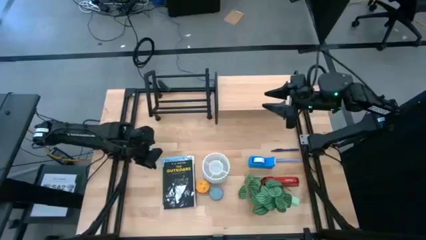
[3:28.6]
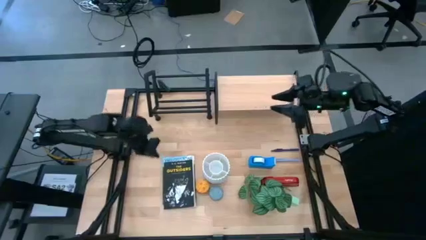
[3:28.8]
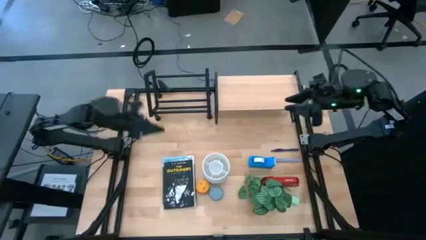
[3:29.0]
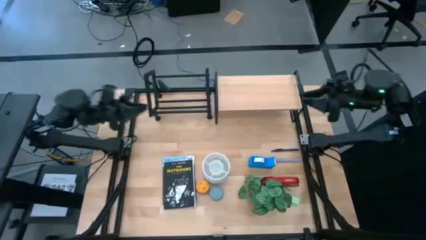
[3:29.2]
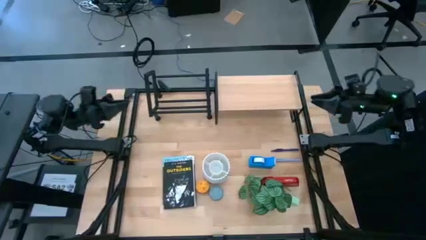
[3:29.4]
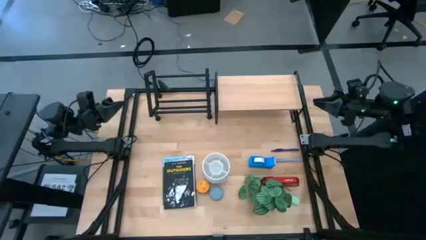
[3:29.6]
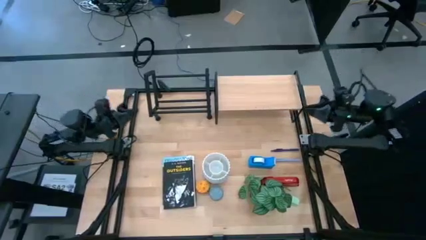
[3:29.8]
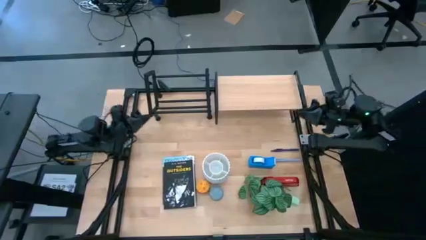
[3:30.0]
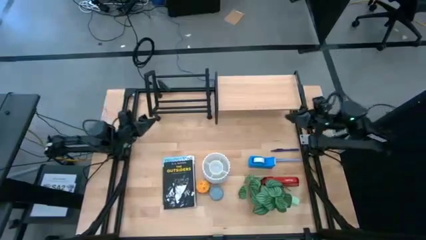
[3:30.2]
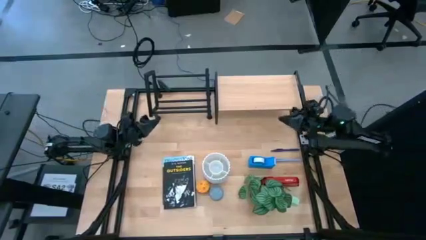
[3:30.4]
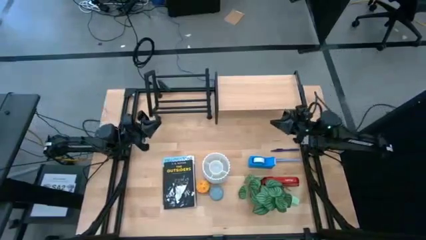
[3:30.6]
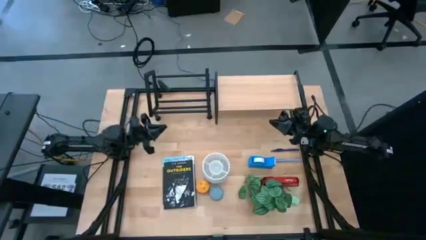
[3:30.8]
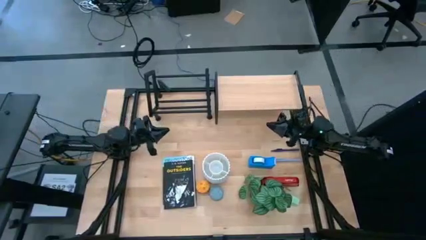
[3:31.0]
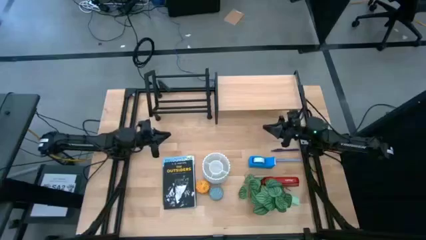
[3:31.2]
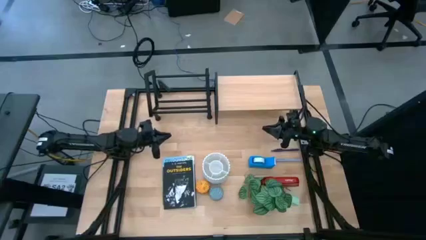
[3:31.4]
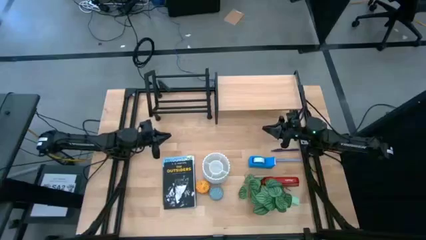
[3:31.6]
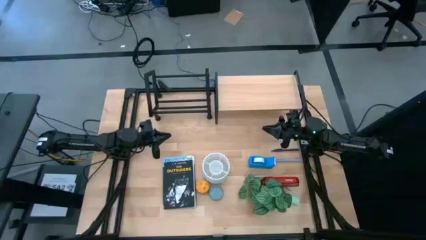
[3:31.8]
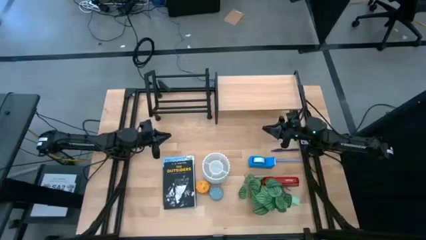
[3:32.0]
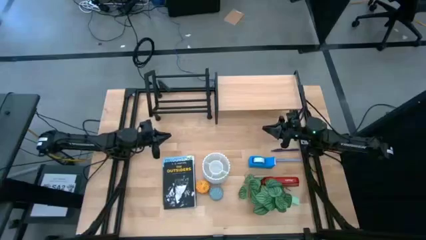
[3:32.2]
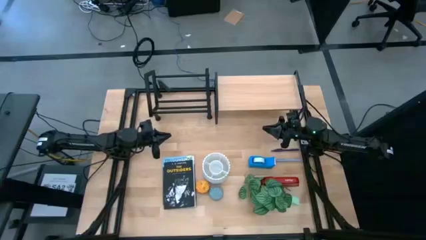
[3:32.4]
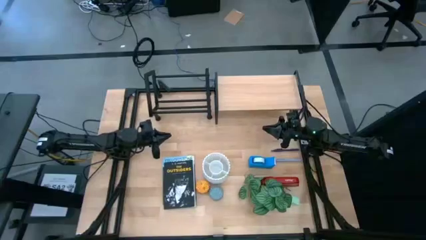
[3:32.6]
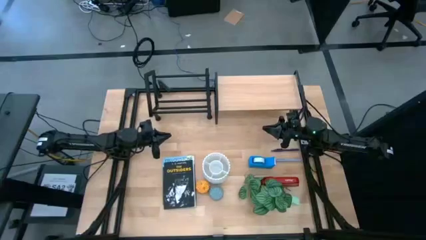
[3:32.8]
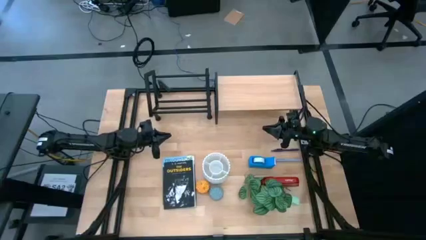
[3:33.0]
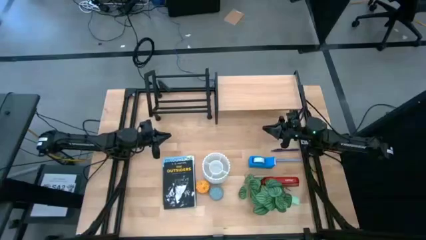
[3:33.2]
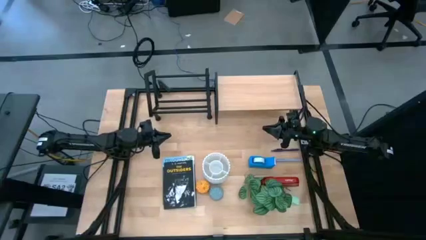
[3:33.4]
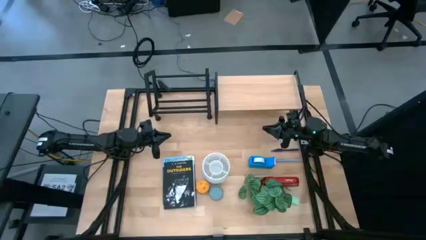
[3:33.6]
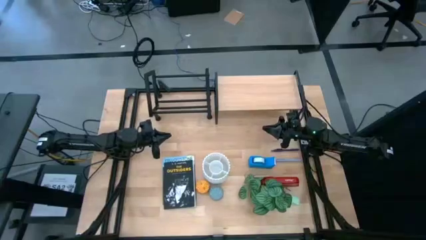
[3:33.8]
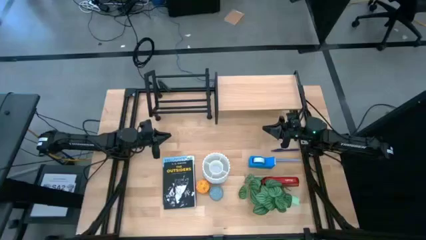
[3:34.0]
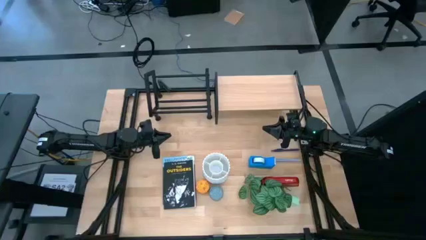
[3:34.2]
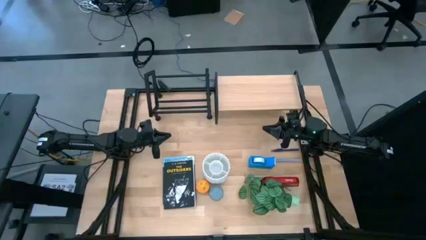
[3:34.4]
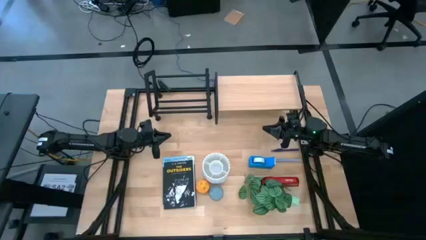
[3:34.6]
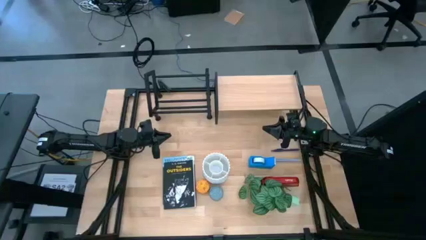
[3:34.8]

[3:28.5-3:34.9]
Task: Stock shelves
Return to Home Position

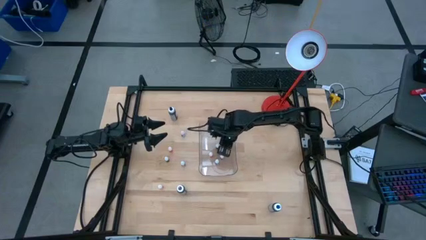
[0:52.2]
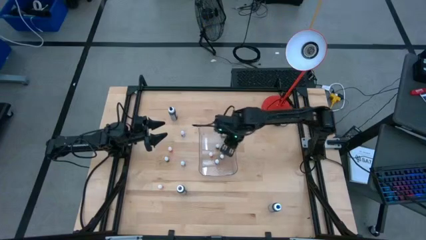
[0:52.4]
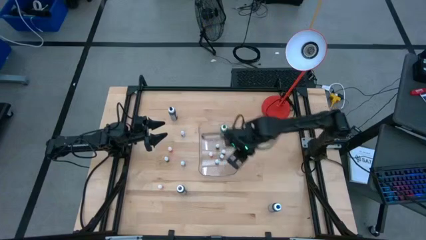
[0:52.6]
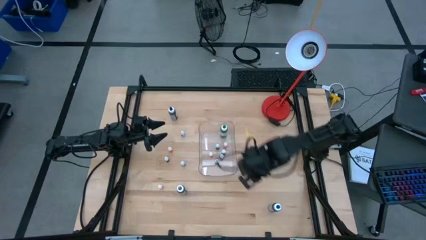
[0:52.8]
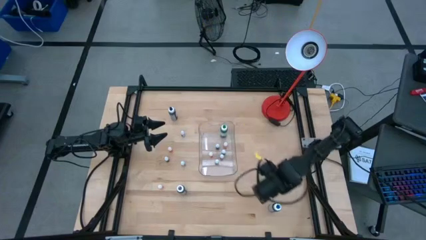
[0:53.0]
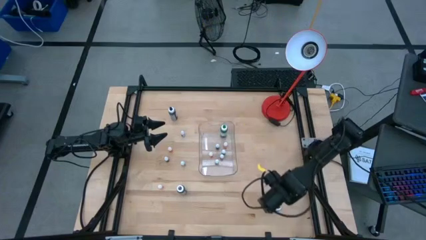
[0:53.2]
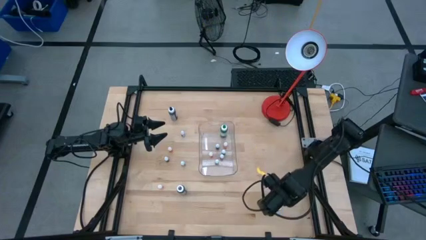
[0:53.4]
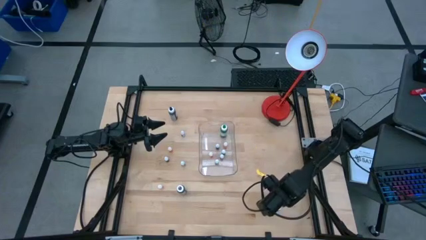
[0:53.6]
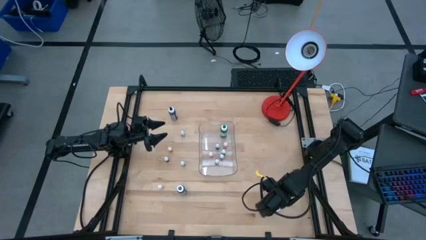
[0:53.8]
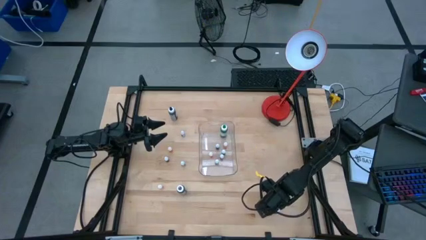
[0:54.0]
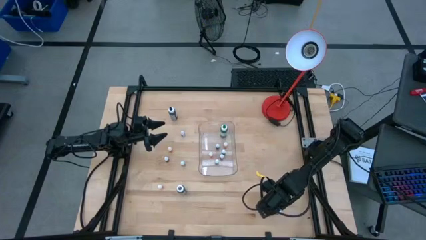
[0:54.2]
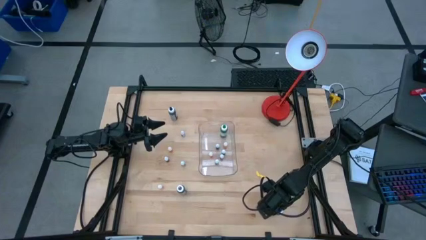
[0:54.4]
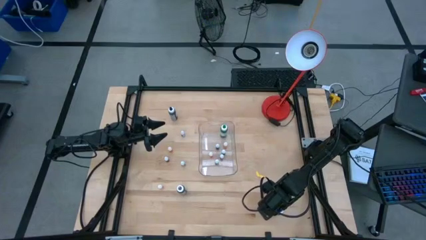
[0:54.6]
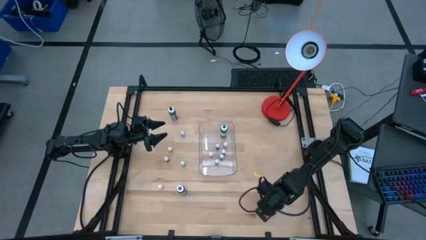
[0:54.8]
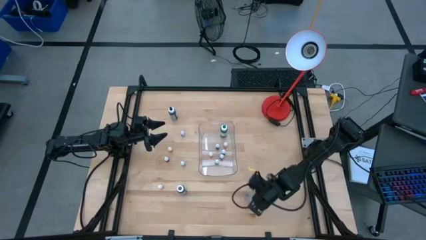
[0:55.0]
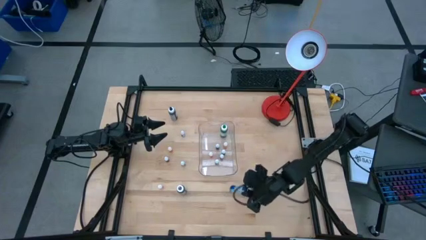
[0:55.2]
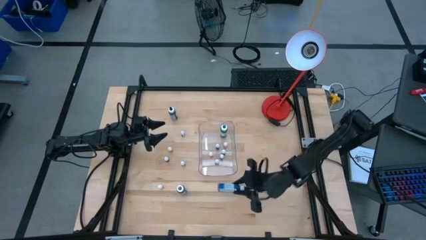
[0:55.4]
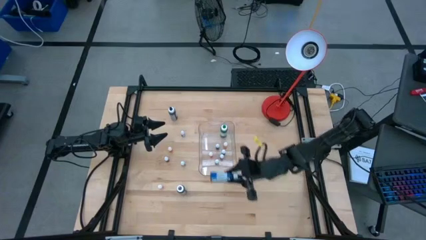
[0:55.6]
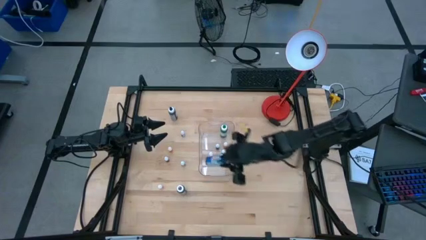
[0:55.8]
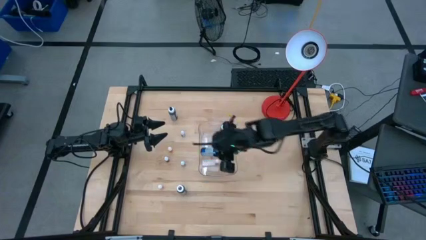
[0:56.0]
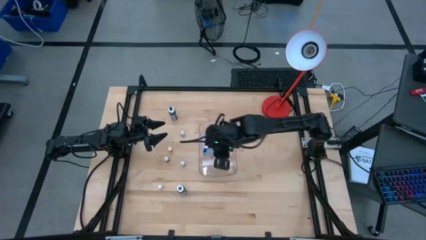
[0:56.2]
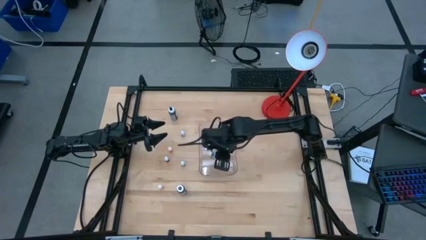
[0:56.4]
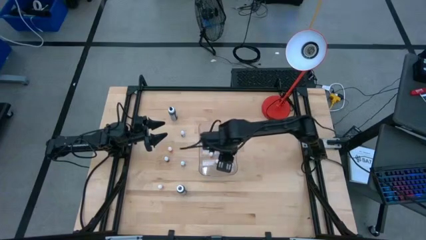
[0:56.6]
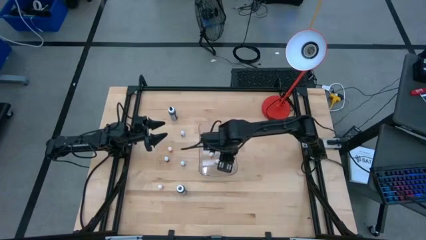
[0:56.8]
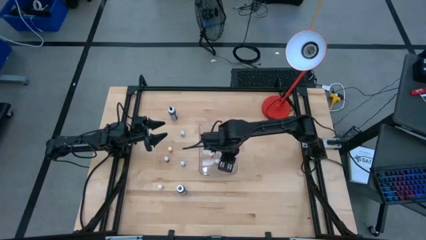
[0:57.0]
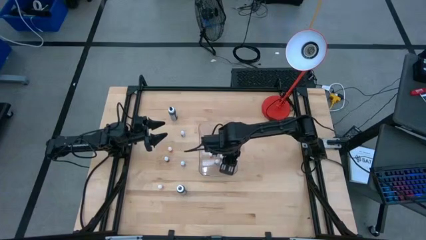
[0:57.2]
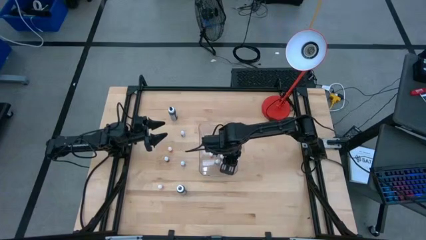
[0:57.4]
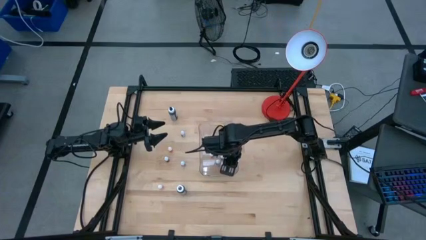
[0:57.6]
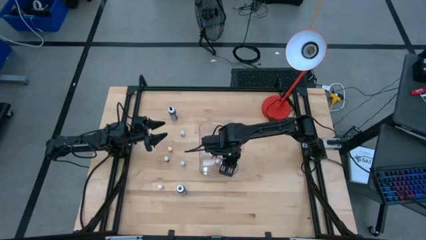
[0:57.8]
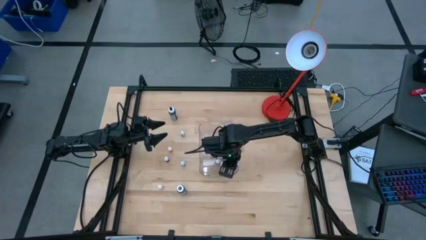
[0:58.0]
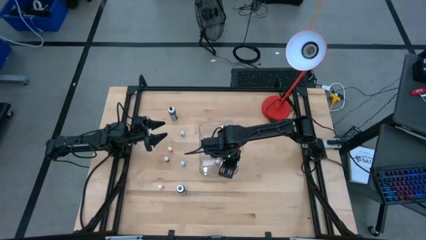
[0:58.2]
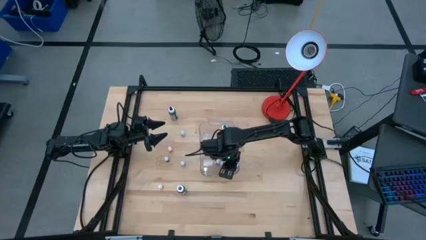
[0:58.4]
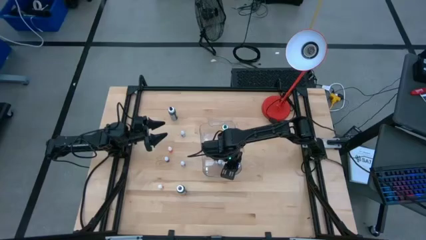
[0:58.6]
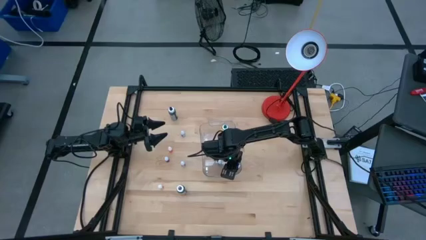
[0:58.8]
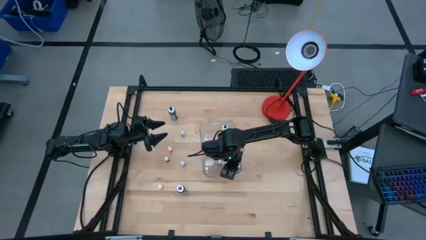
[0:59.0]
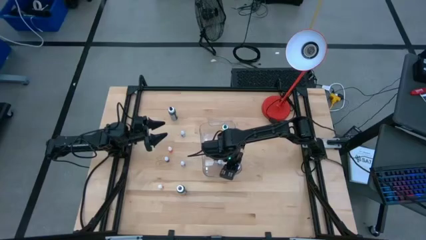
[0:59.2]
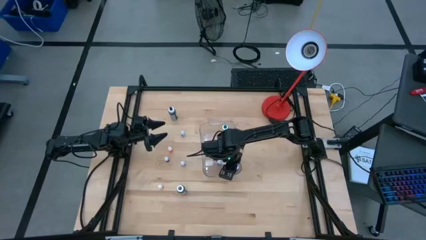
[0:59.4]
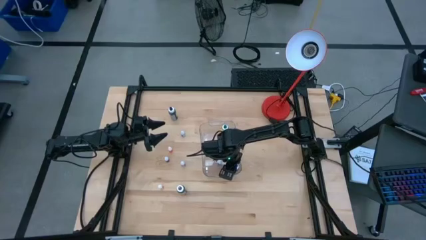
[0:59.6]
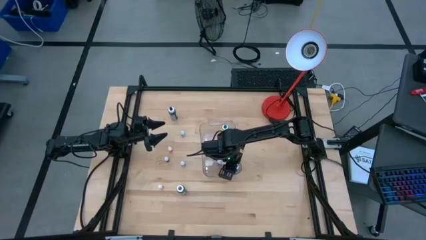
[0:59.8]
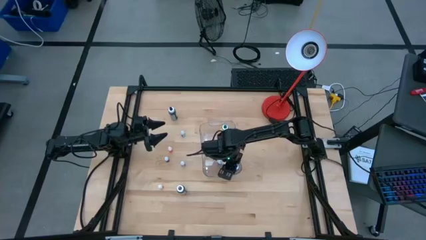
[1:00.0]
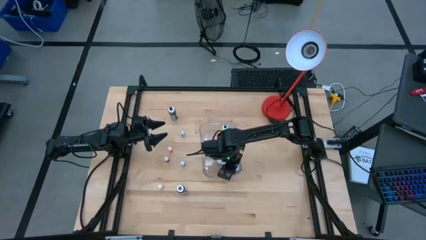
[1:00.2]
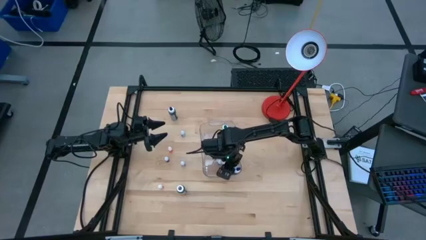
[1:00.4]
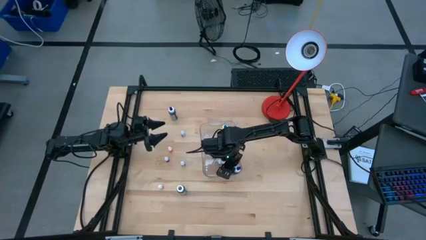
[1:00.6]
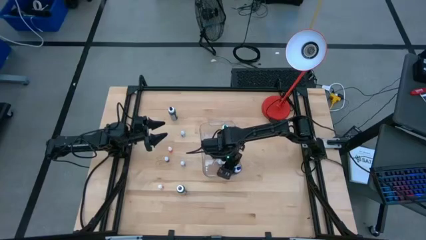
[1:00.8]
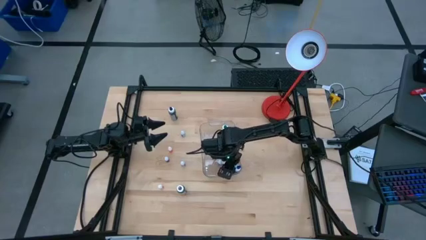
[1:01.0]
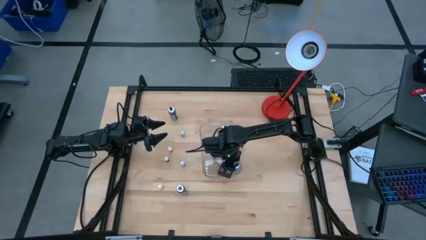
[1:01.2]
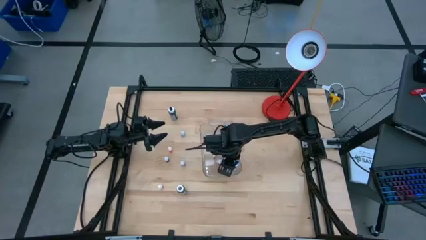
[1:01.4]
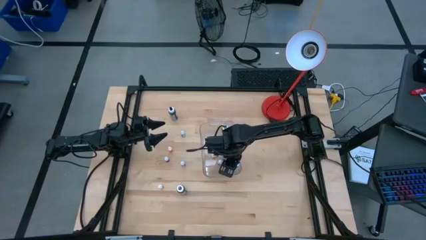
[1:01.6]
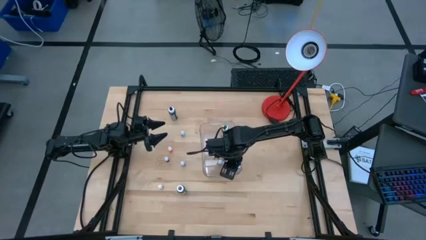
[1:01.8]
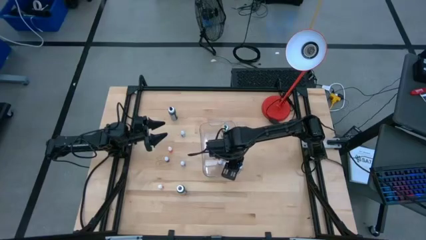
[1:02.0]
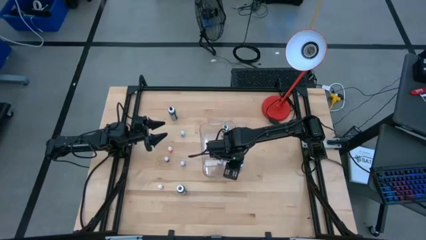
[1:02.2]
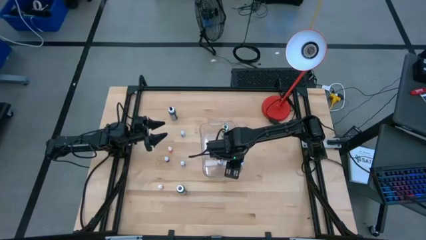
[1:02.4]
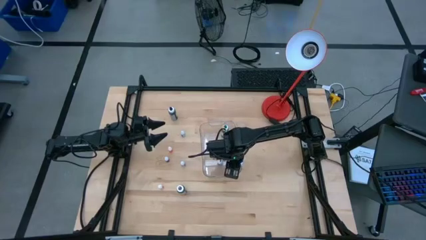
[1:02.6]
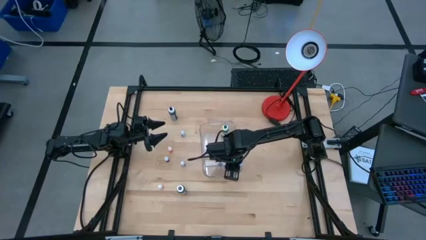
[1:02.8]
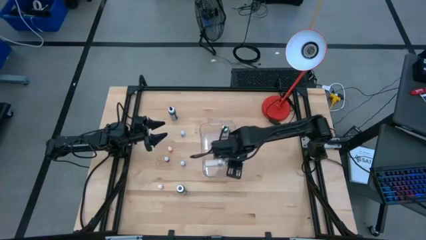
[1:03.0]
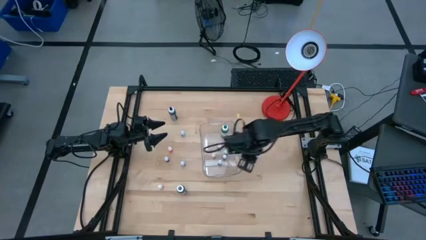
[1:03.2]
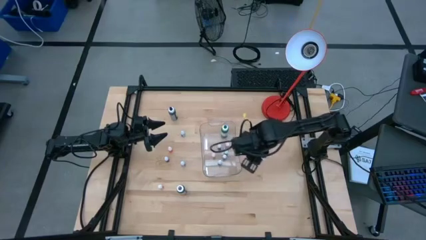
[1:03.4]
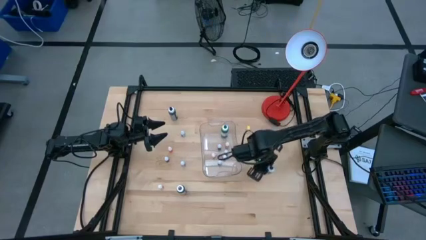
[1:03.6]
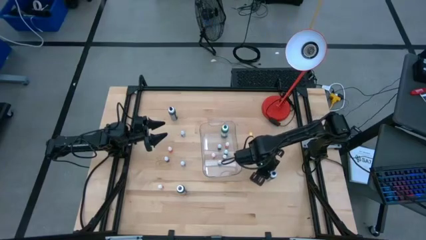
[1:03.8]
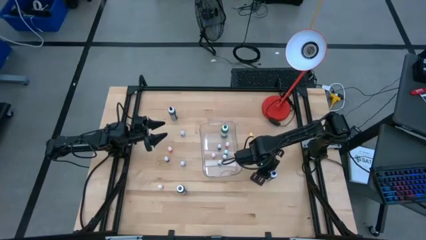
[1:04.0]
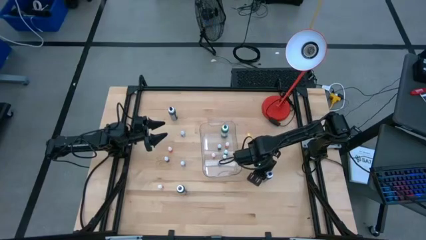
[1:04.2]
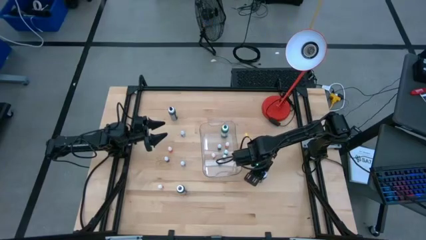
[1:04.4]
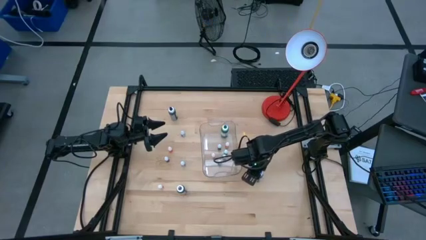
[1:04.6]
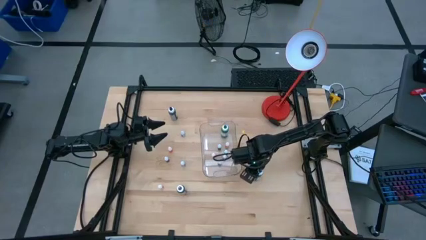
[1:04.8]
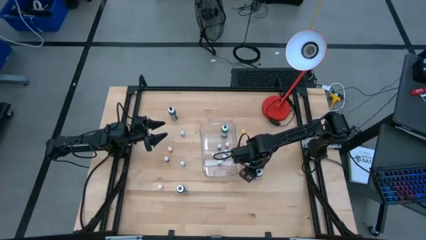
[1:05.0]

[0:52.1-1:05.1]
Task: Pick & Place food coloring
Put the big blue food coloring bottle into the transparent bin
